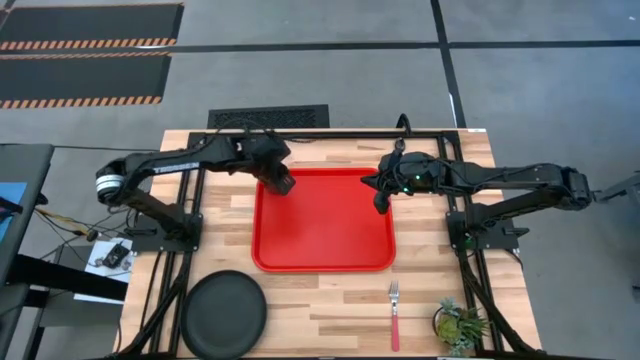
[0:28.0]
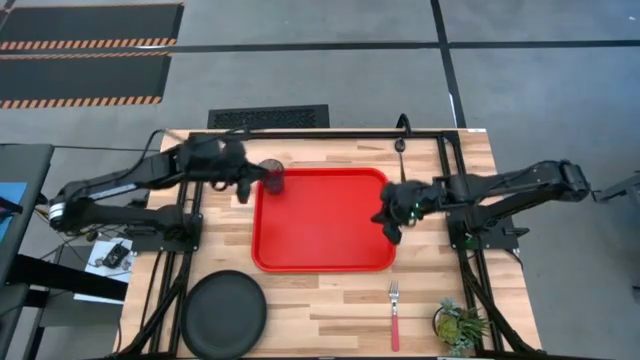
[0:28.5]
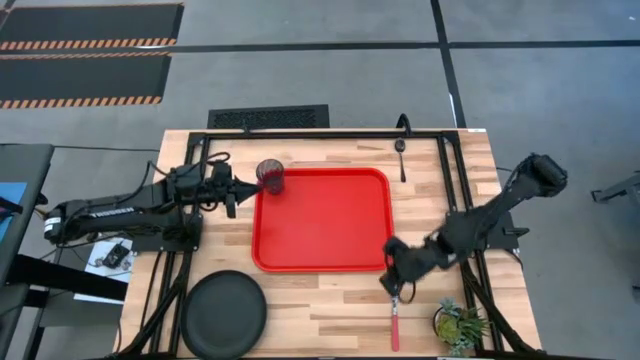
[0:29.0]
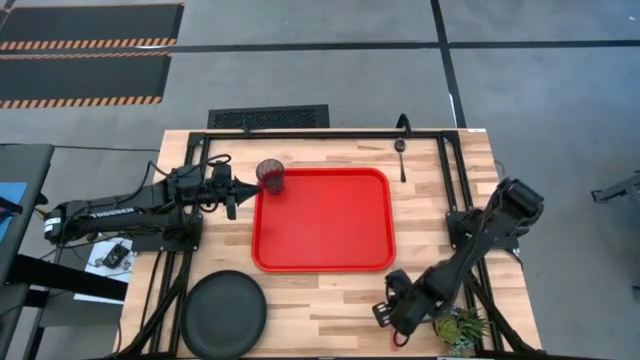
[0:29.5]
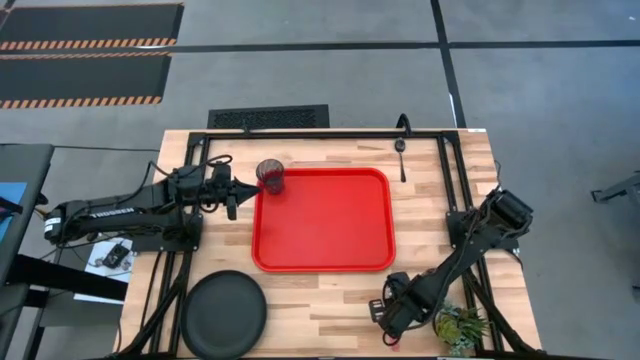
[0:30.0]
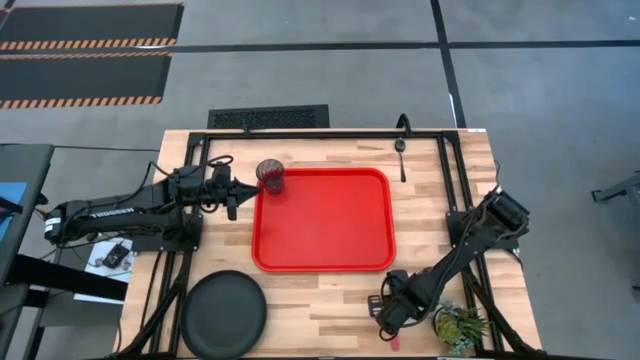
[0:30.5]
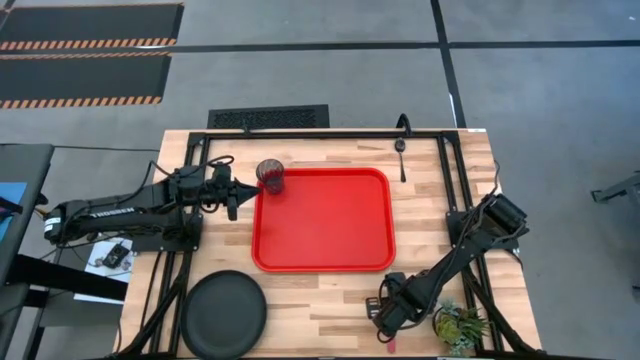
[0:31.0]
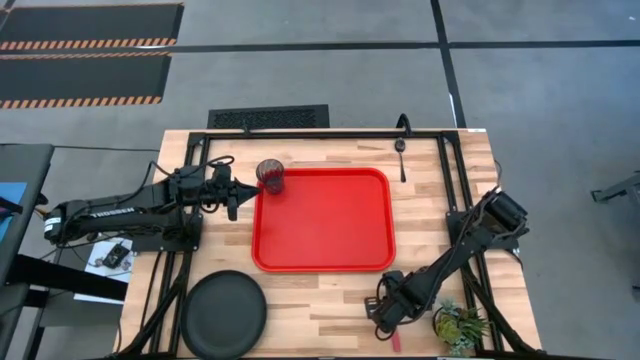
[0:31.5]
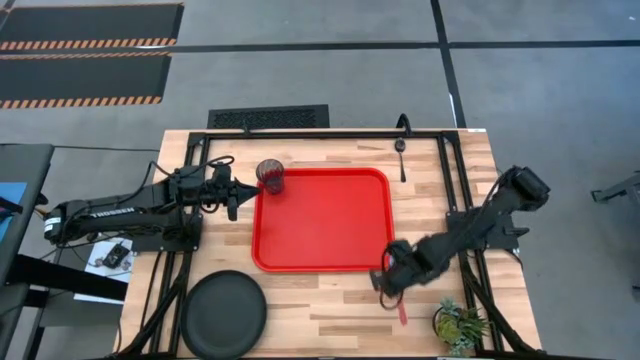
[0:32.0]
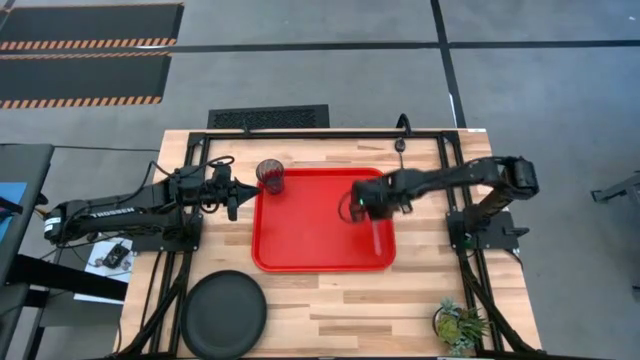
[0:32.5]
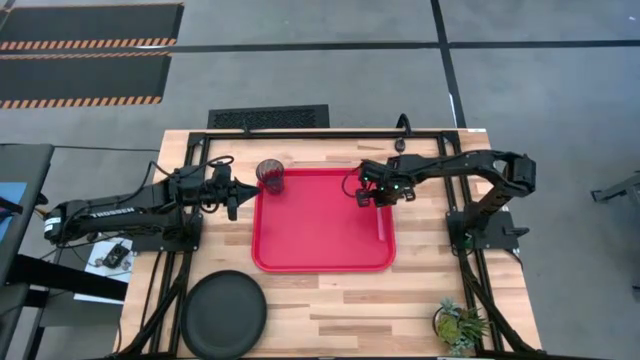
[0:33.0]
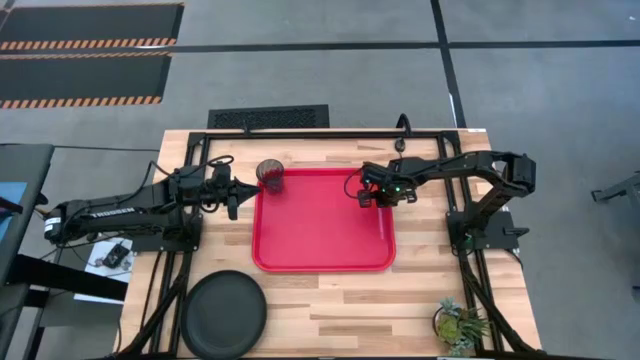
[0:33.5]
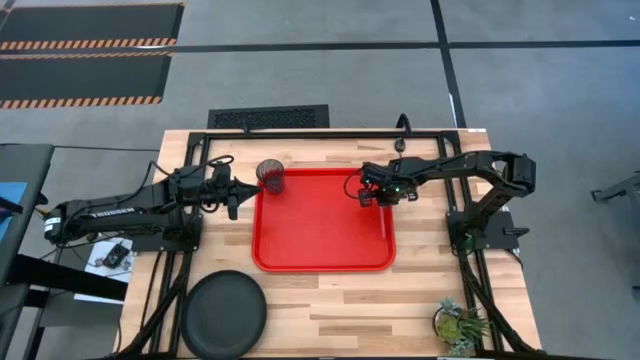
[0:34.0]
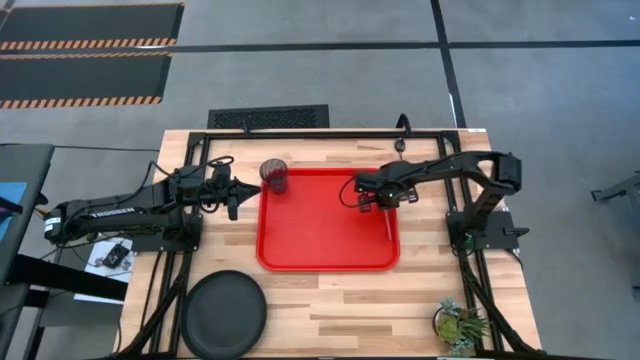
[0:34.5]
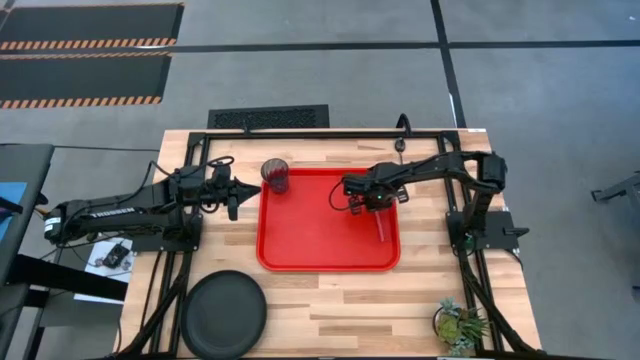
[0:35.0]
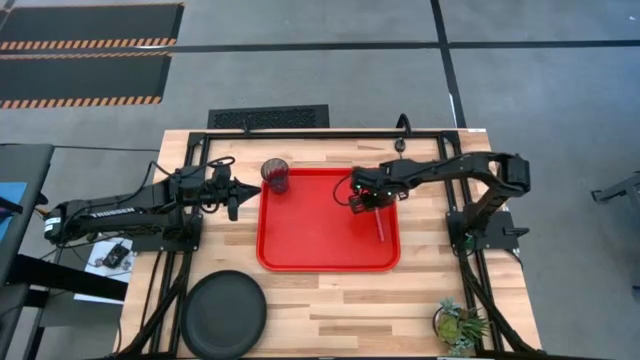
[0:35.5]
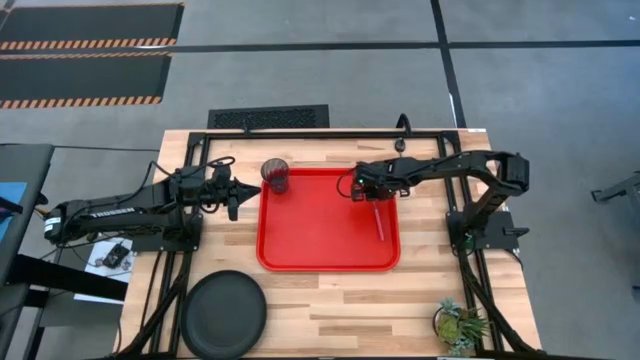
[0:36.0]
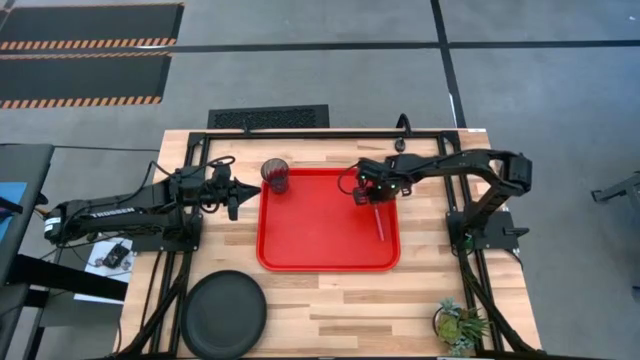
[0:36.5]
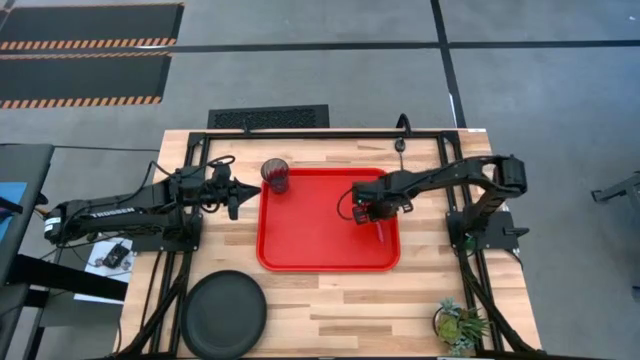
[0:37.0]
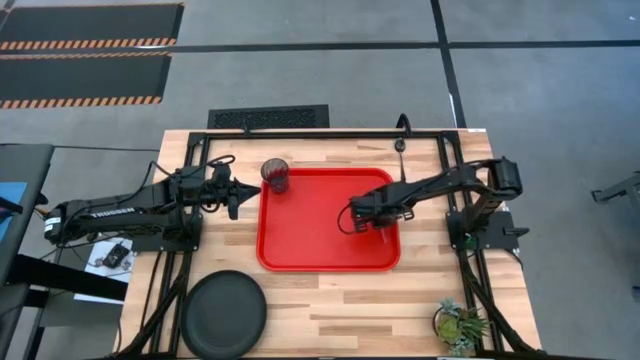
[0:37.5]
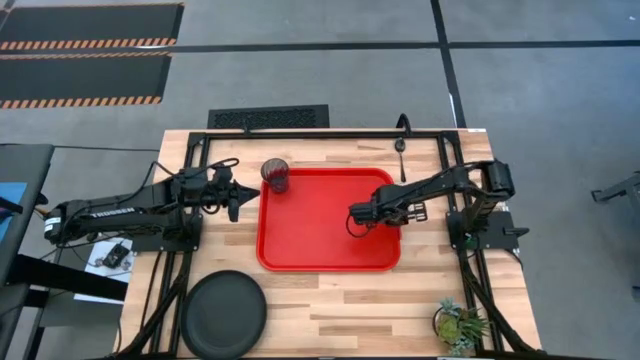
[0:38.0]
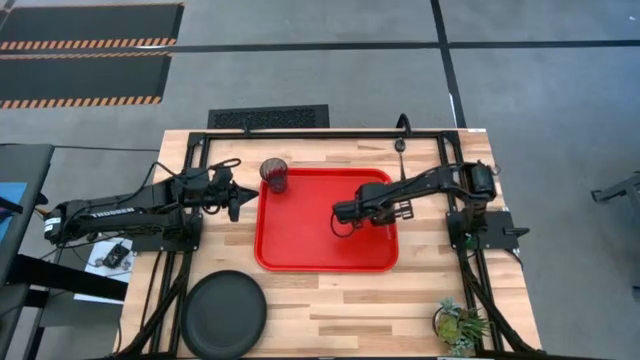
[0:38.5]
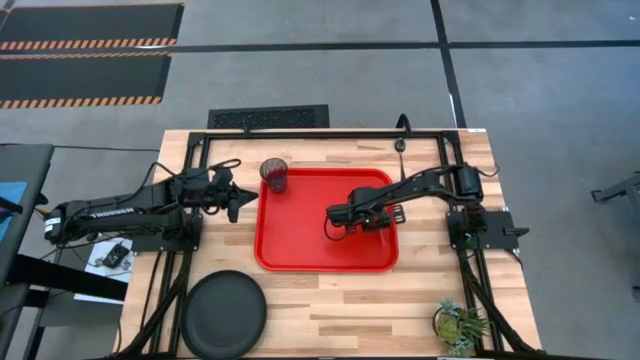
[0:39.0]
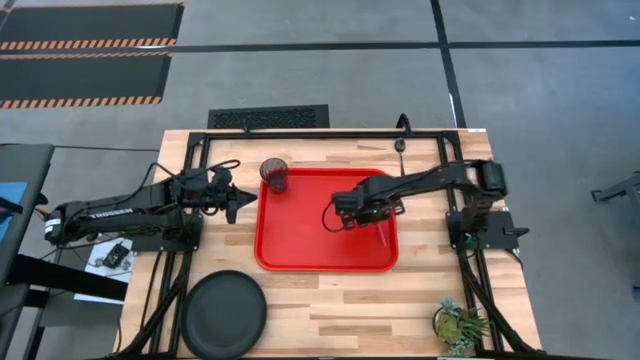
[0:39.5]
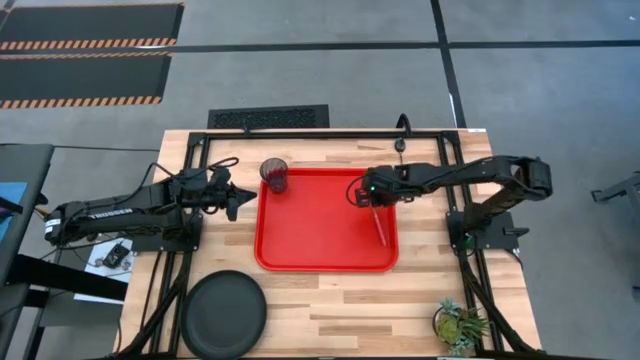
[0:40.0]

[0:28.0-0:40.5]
Task: Pick and place plate/cup/fork/spoon on tray
Put the pink fork on the right side of the red tray

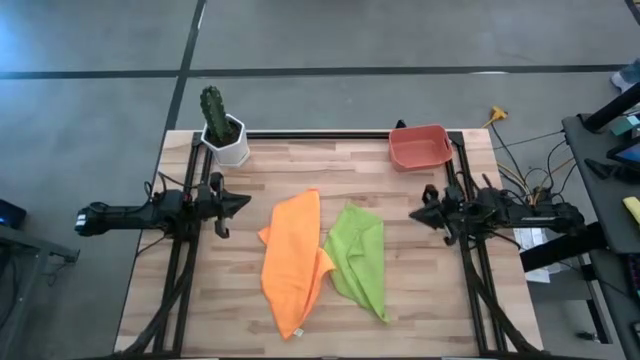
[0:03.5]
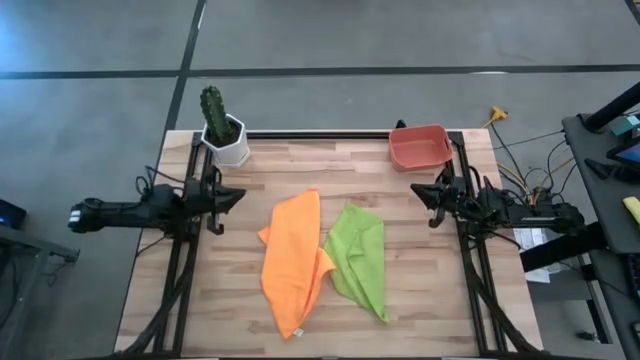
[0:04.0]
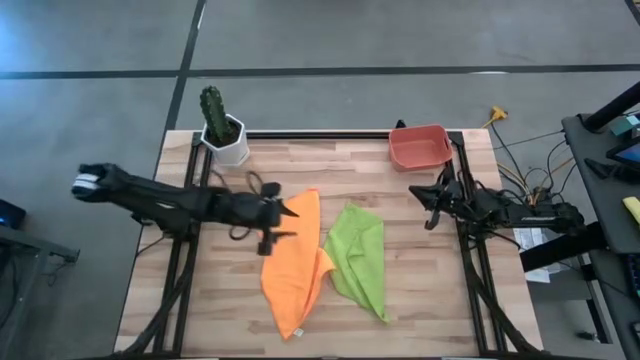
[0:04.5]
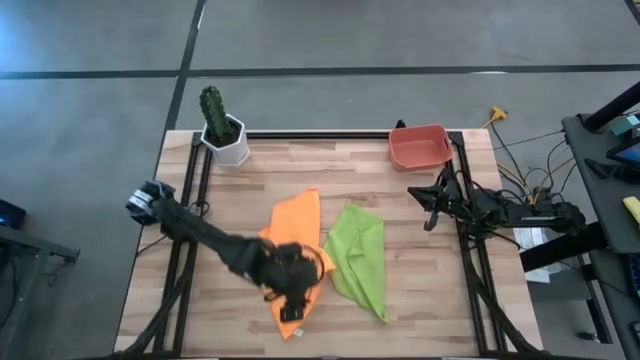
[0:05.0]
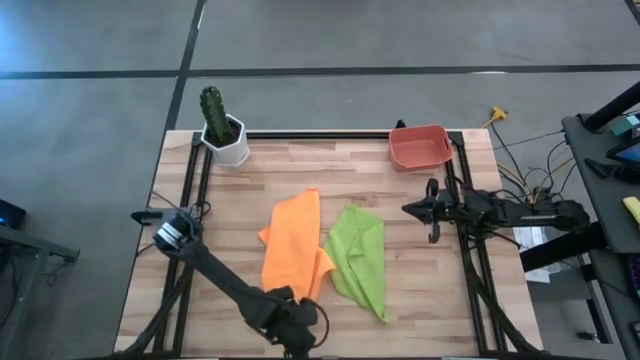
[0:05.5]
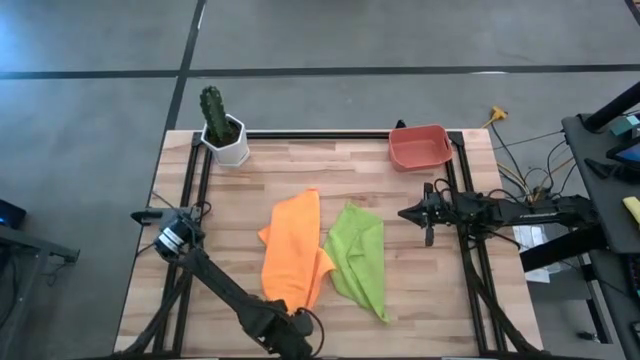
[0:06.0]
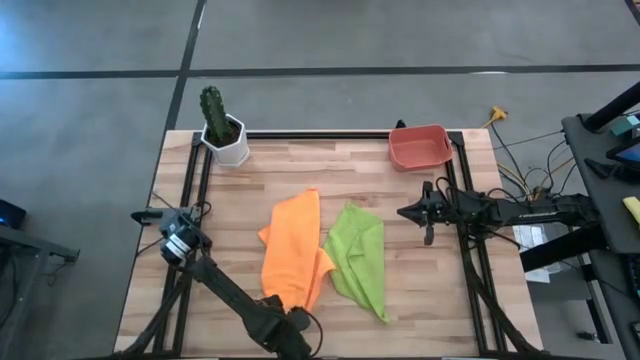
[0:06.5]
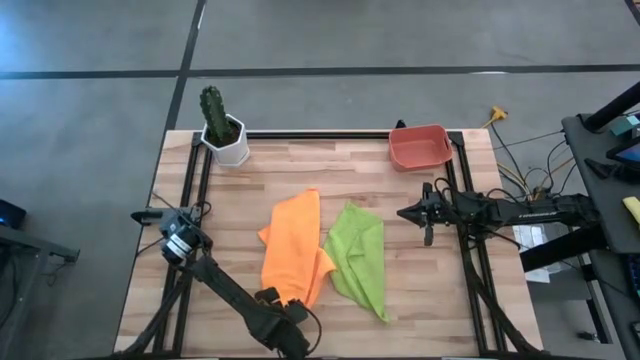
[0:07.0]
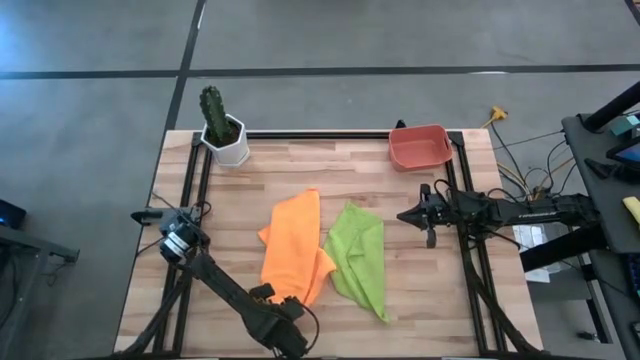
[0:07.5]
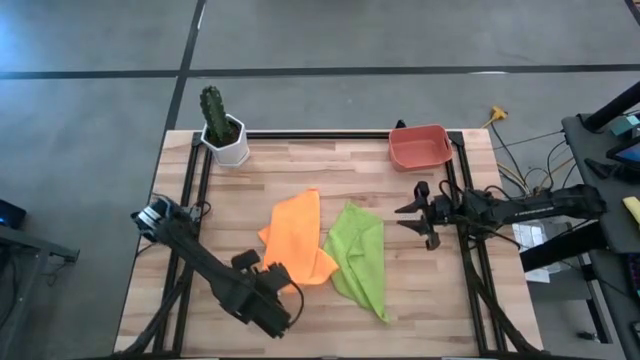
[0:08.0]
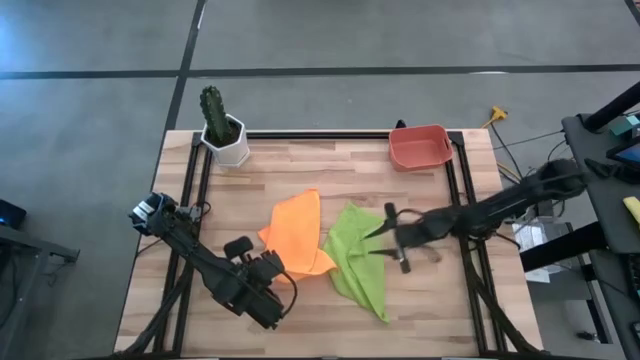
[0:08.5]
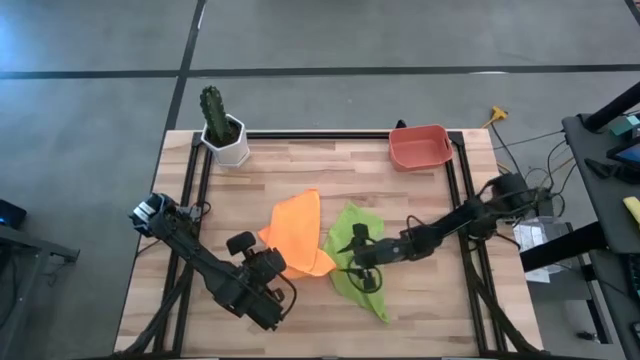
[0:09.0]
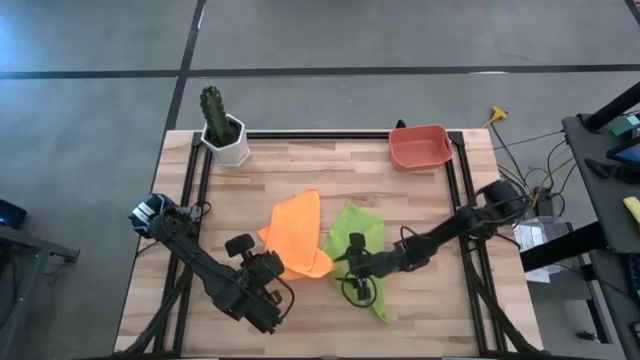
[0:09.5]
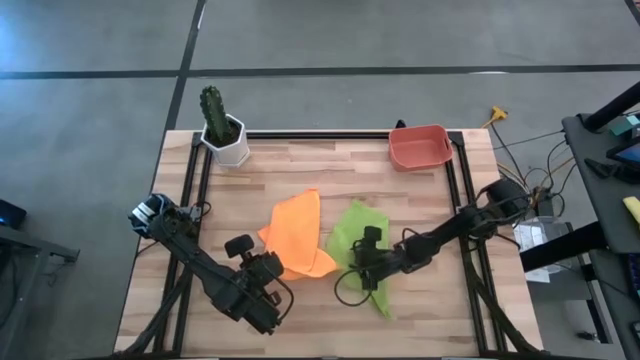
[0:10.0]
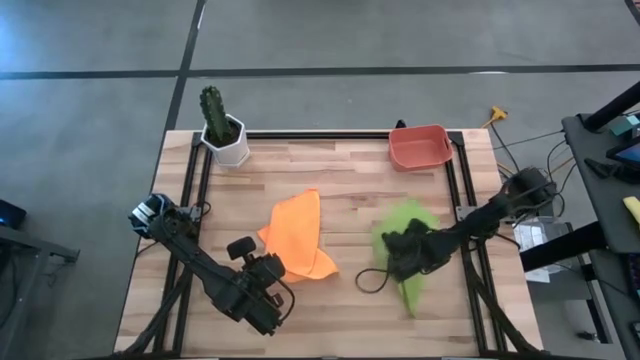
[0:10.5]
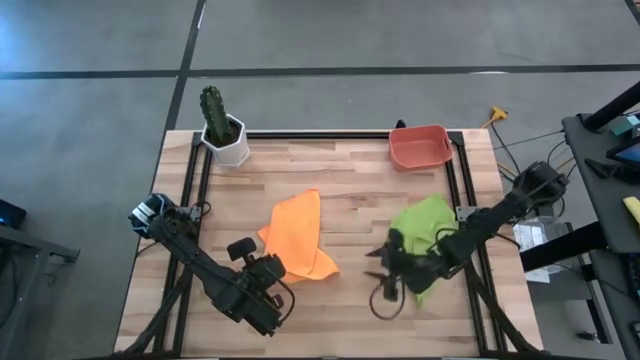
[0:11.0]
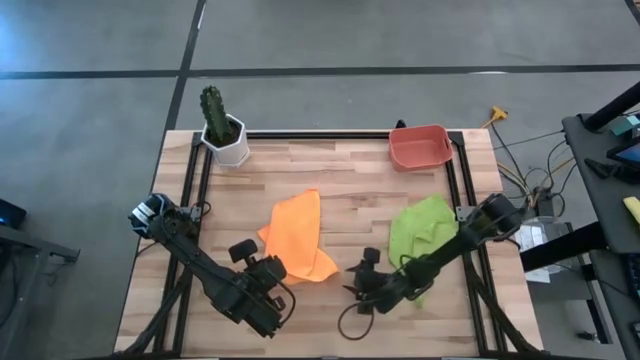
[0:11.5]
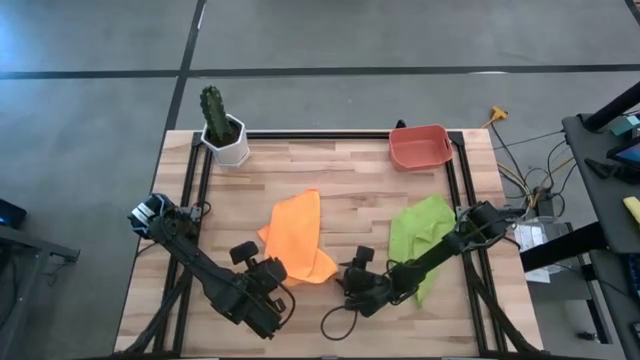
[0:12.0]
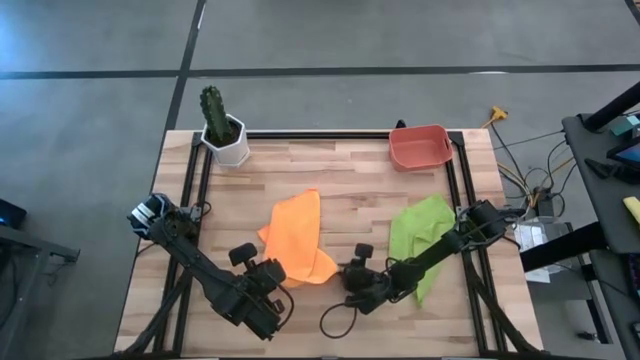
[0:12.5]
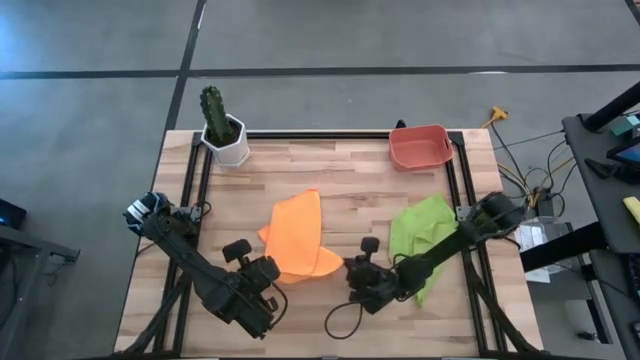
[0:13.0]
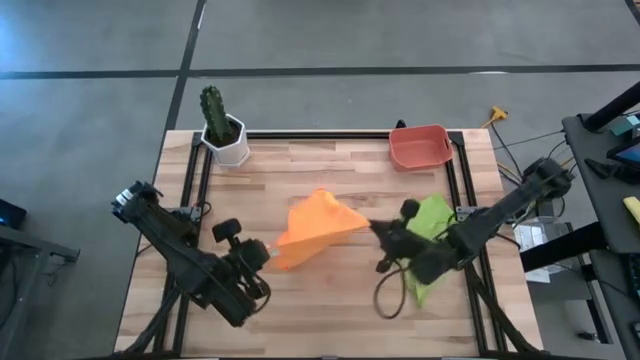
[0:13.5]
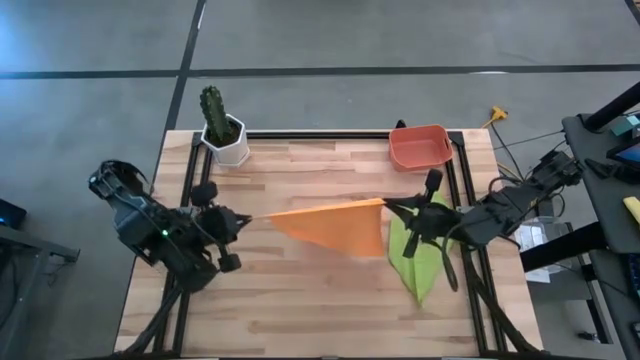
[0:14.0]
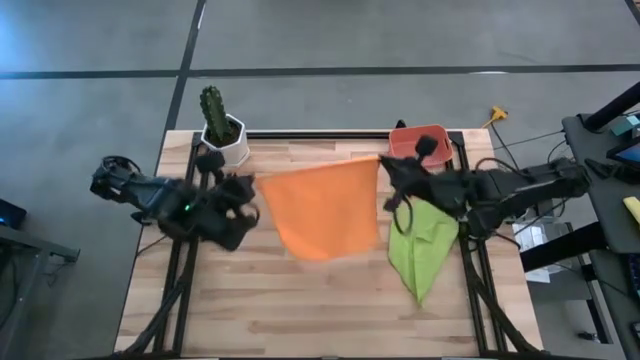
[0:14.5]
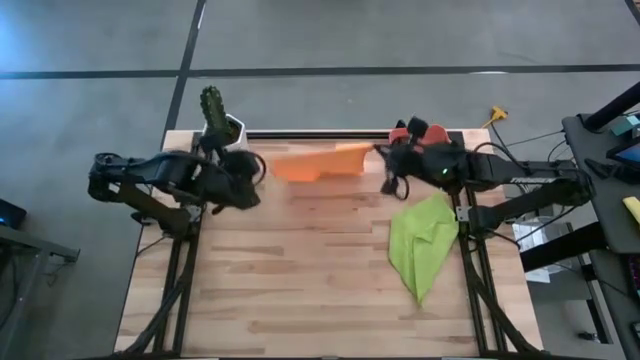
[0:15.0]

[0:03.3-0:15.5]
Task: Roll microfiber towels into tight, uniform cylinder then place into a basket
Fold the orange microfiber cloth
